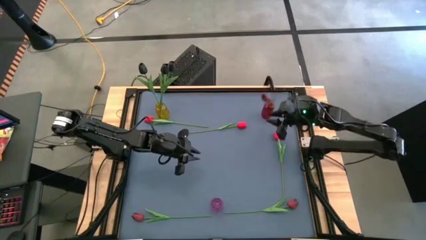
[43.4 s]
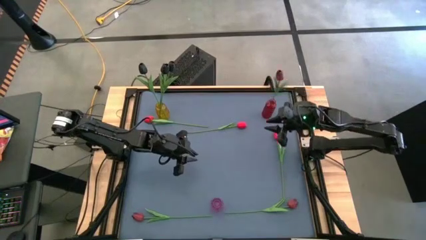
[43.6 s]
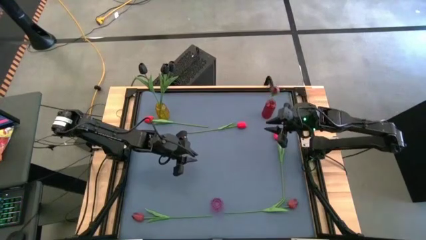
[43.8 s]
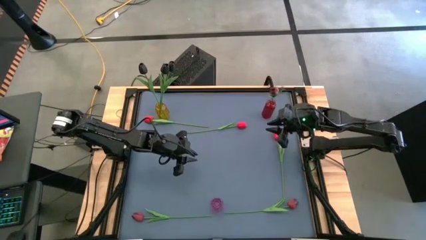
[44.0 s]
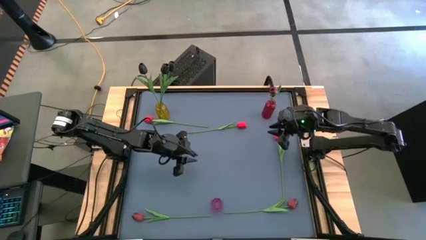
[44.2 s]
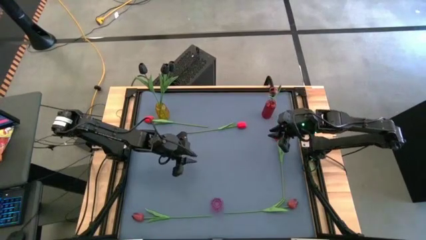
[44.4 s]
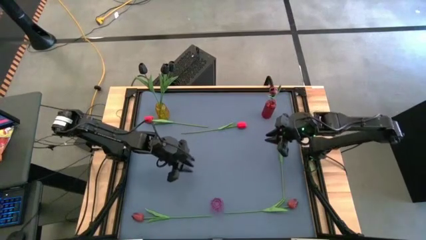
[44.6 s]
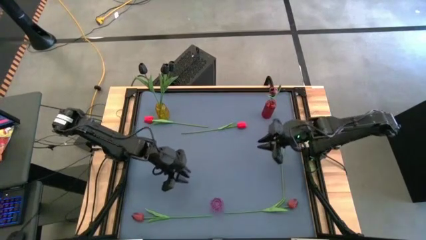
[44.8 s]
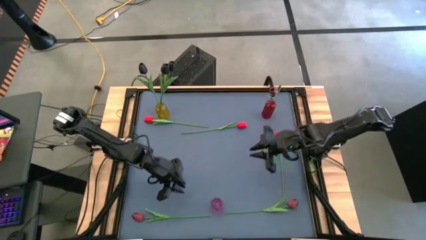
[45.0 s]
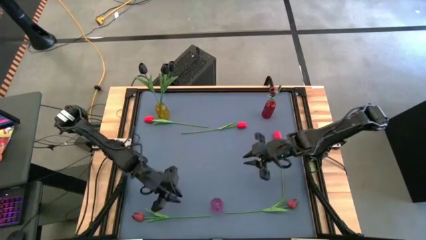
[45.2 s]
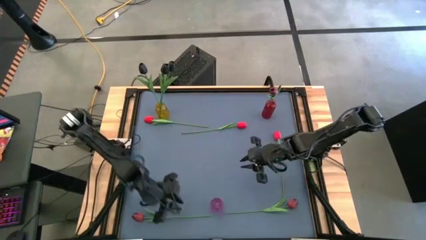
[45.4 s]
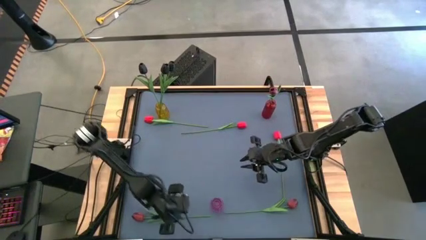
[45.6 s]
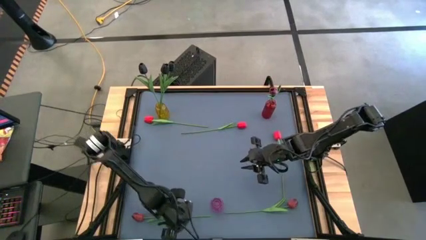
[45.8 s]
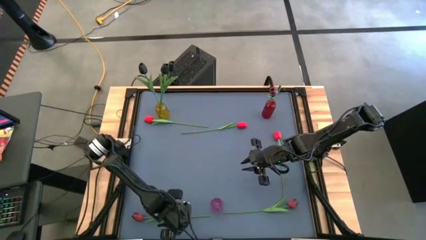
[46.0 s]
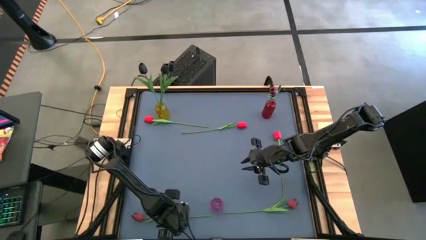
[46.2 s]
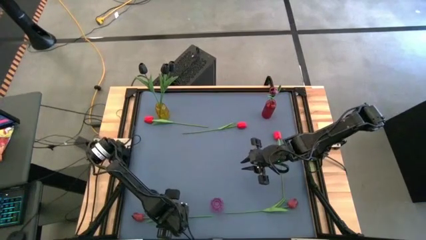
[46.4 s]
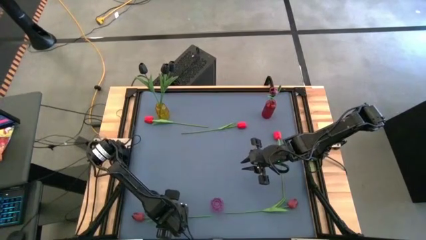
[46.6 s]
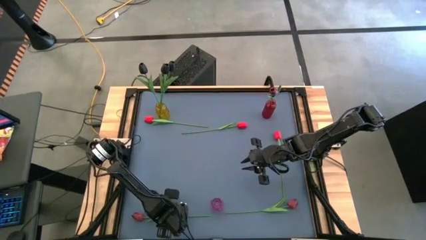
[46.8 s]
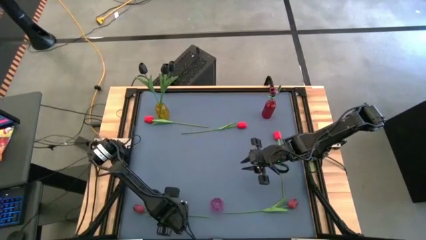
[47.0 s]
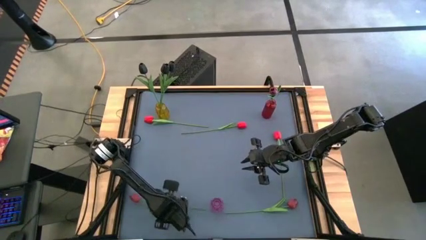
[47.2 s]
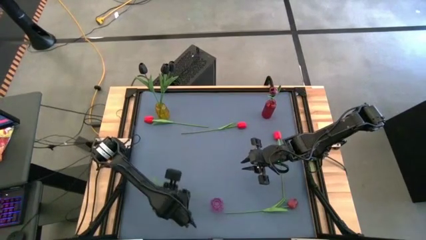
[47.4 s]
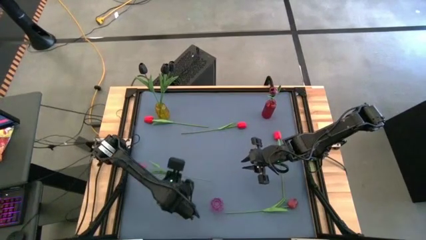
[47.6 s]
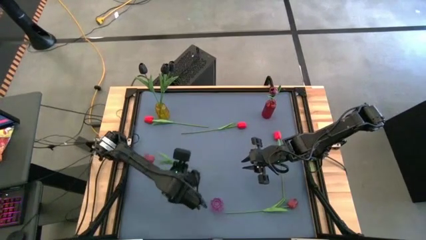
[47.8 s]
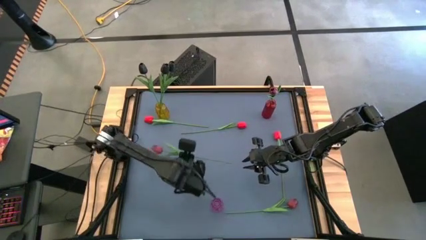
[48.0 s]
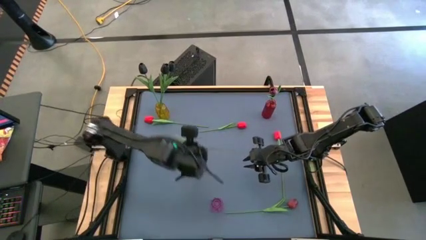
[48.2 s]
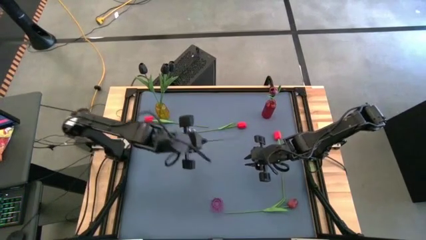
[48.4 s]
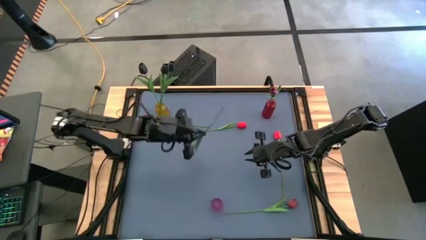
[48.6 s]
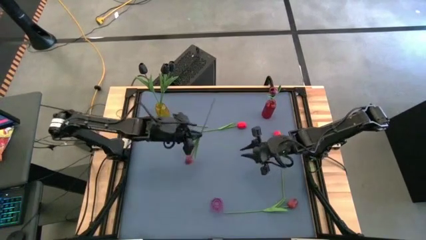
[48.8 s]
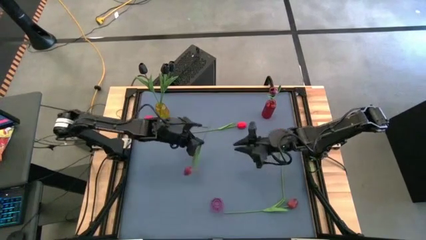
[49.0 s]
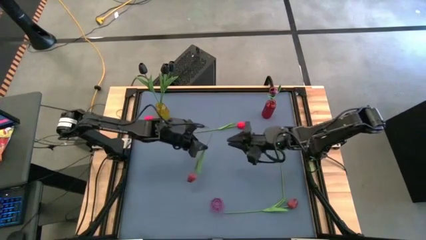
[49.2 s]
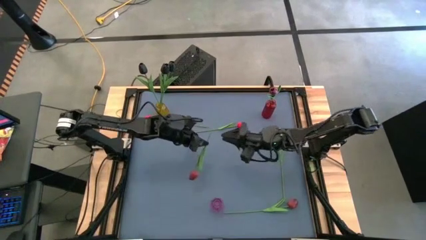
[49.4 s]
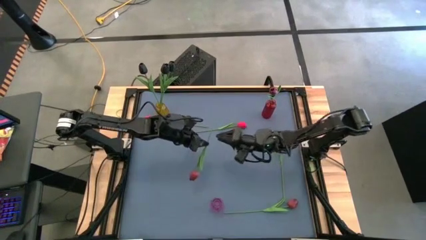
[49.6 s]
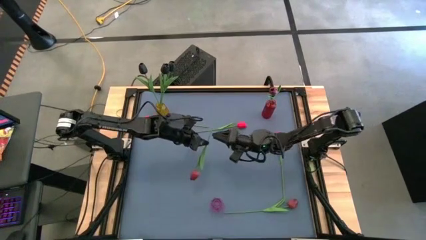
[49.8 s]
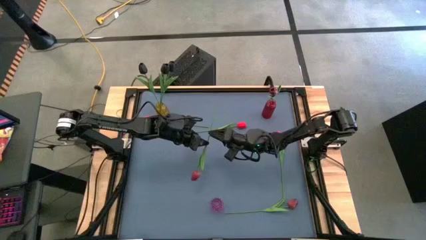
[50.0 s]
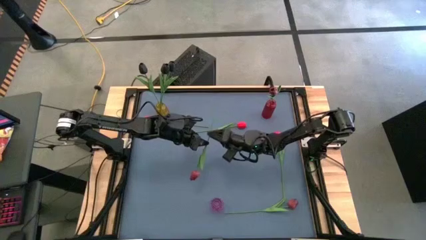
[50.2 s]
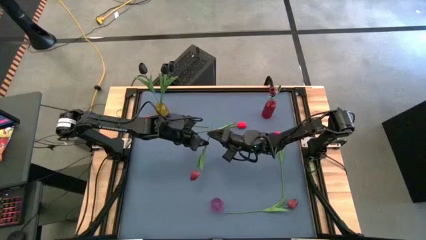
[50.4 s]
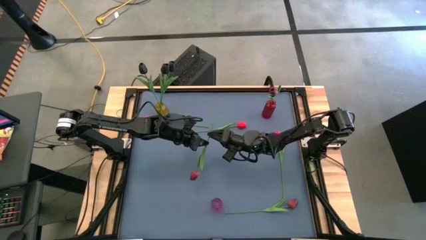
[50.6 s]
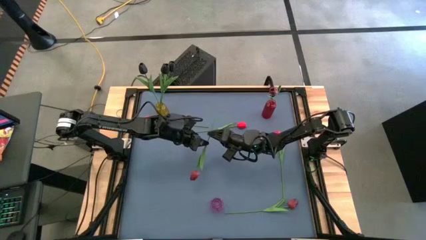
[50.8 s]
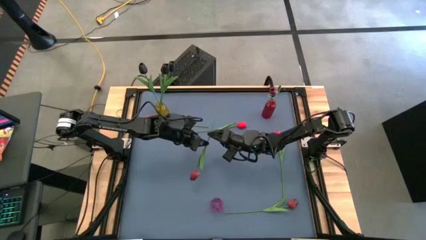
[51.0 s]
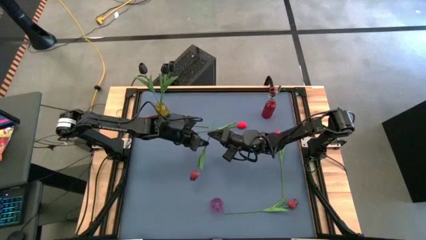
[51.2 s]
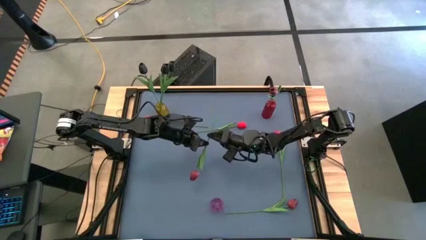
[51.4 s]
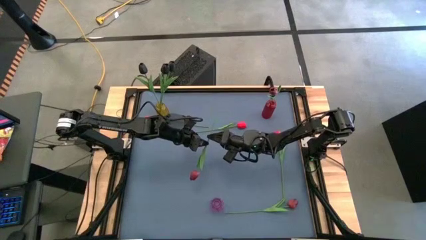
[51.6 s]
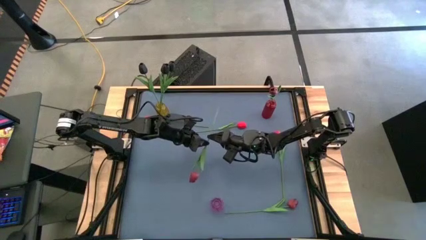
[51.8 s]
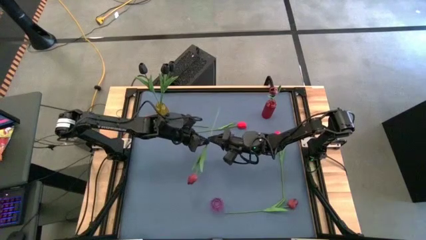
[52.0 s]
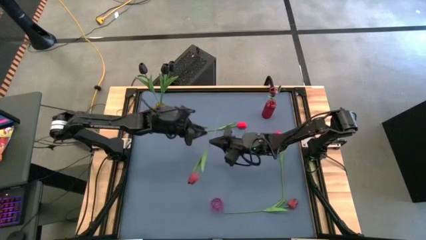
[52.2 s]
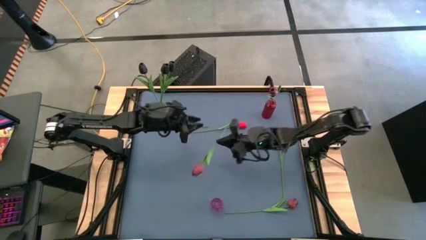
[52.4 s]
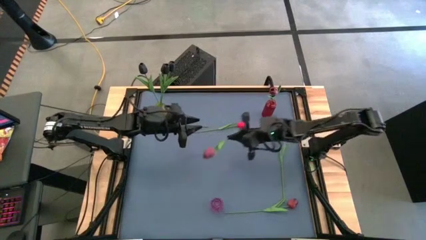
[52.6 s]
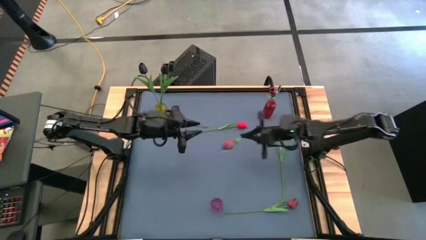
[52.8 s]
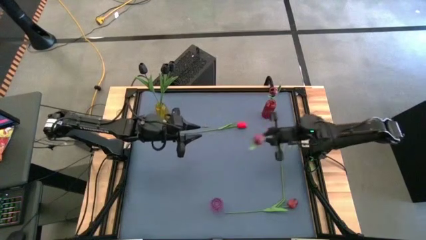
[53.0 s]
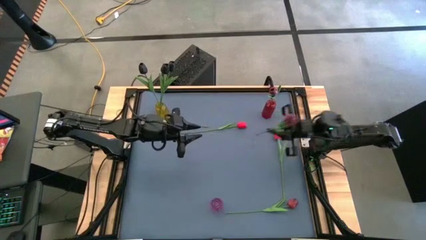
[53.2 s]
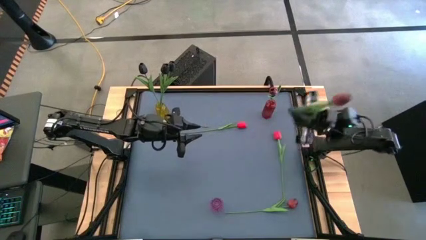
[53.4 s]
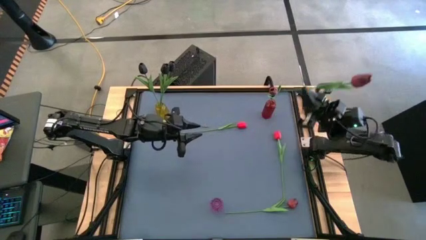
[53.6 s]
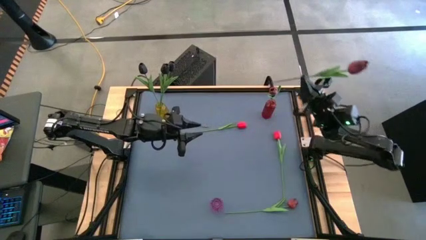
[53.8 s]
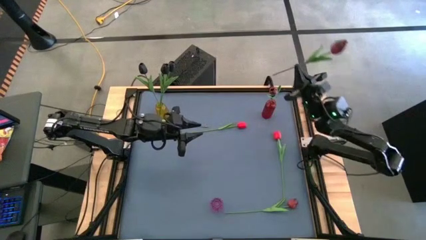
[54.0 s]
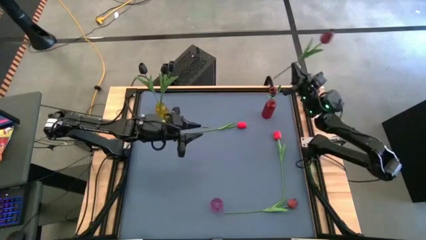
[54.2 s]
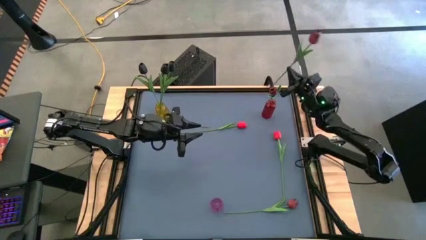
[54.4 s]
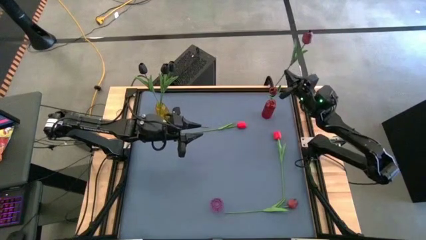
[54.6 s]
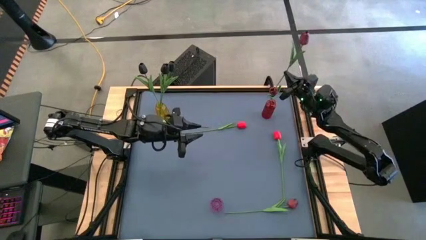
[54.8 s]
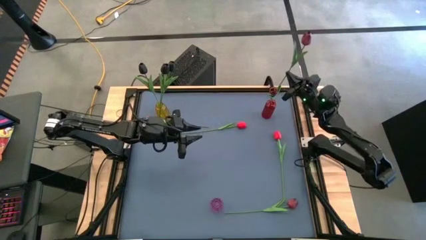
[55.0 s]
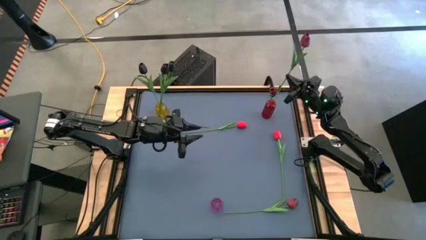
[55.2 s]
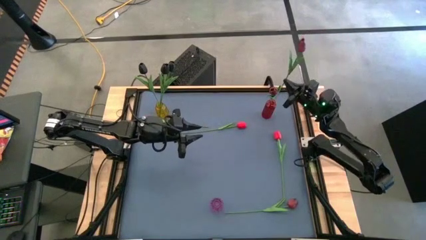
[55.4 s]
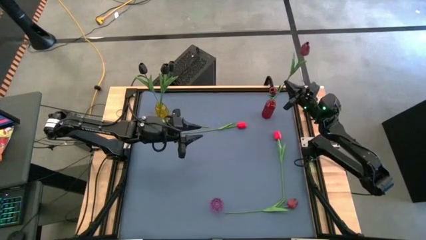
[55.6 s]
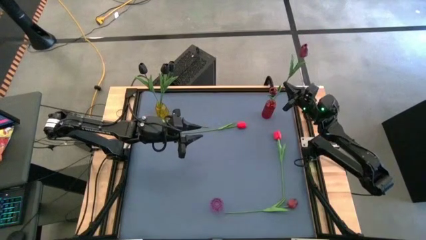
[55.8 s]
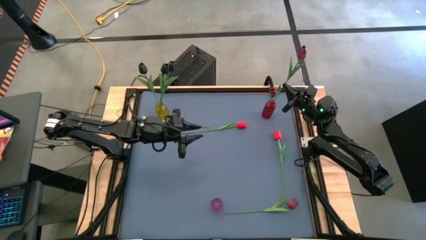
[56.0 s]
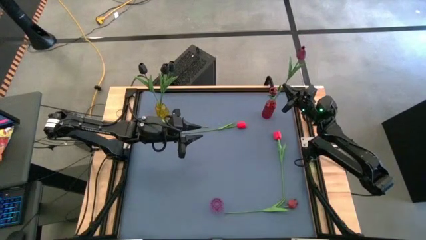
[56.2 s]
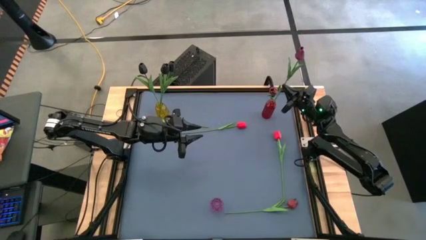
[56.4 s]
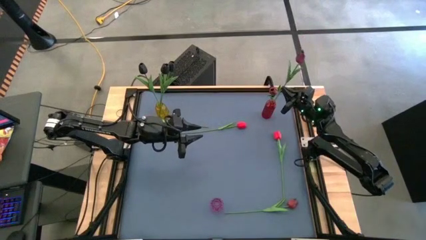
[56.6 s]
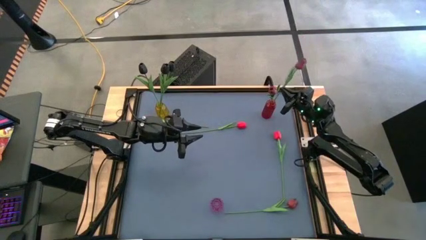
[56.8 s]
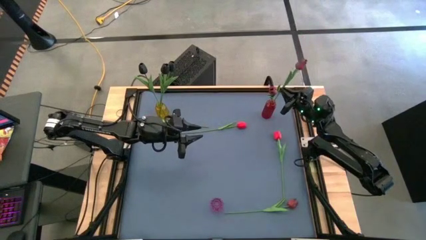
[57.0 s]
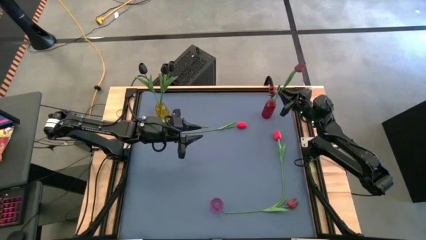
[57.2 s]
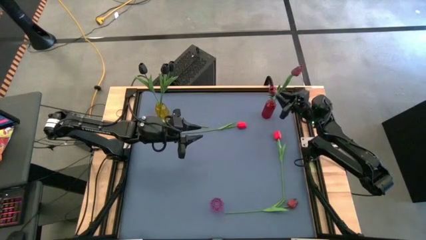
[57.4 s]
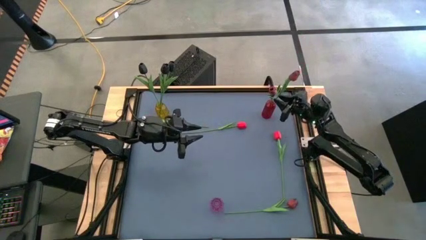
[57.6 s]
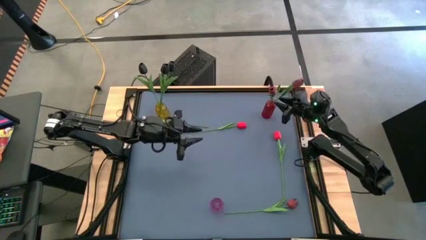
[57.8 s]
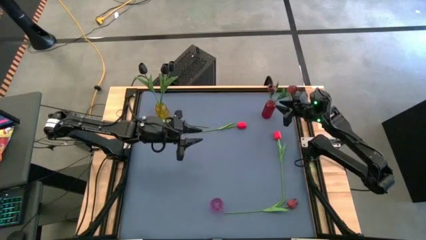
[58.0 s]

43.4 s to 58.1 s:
Task: Sort flowers into vase by color
Put the left purple flower into the red vase

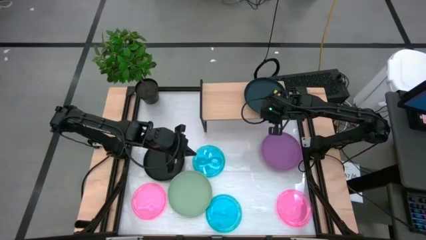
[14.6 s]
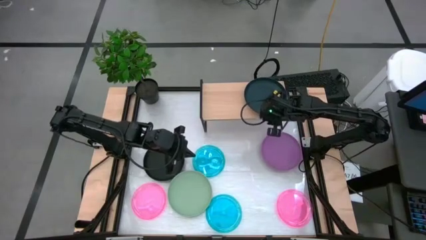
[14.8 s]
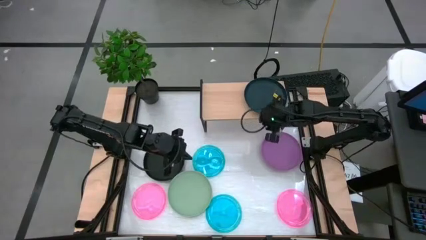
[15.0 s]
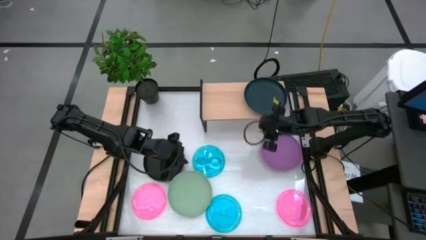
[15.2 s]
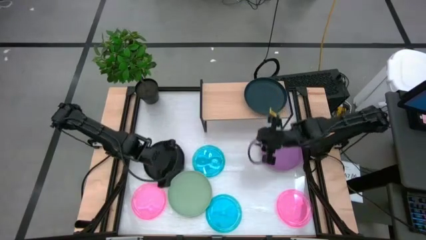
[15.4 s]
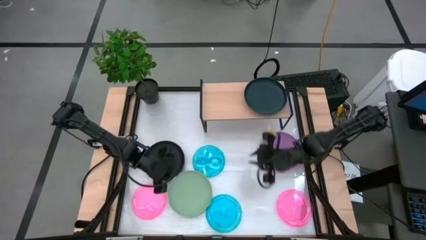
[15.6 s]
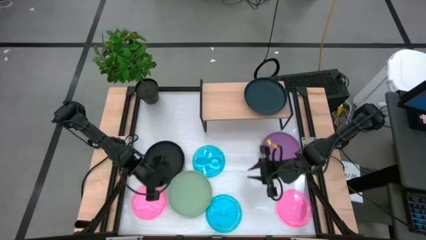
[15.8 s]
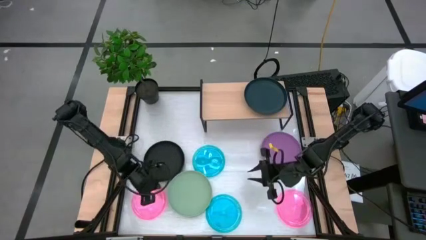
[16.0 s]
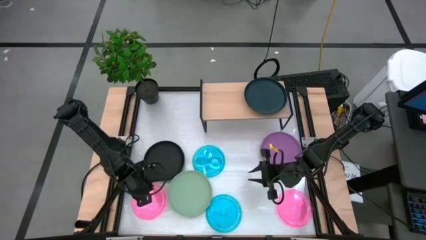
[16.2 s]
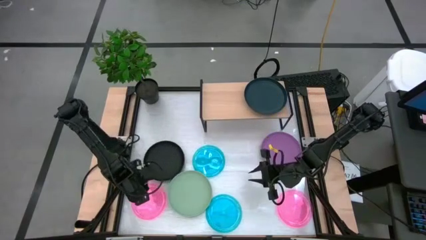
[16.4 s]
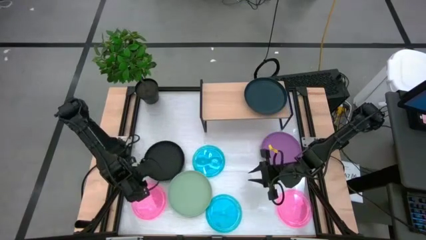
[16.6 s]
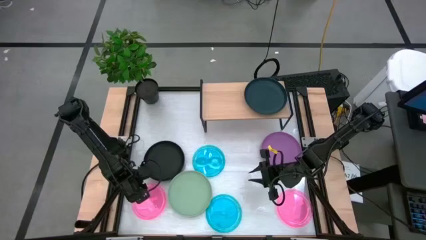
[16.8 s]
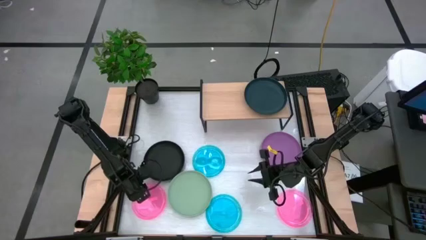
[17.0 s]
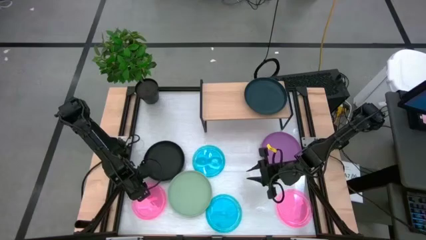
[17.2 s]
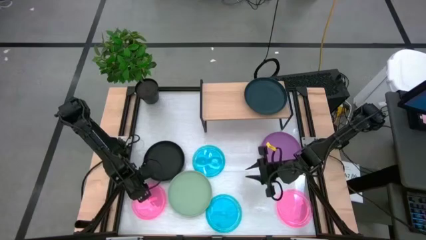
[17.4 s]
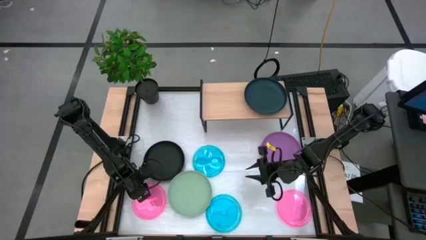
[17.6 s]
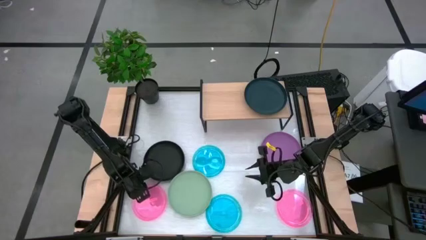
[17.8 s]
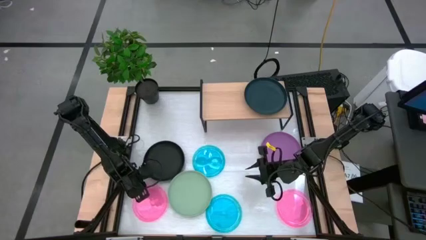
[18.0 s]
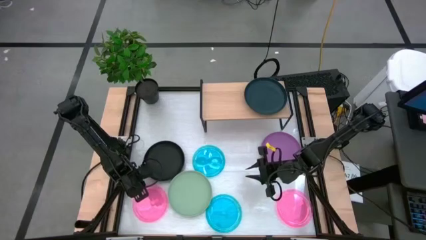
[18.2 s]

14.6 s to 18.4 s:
Task: Place and stack plates onto a shelf
Put the left pink plate on the shelf
